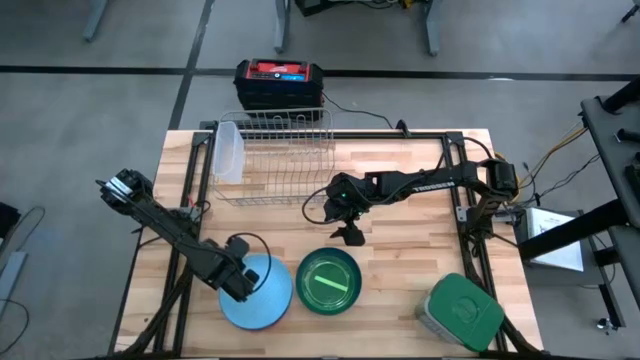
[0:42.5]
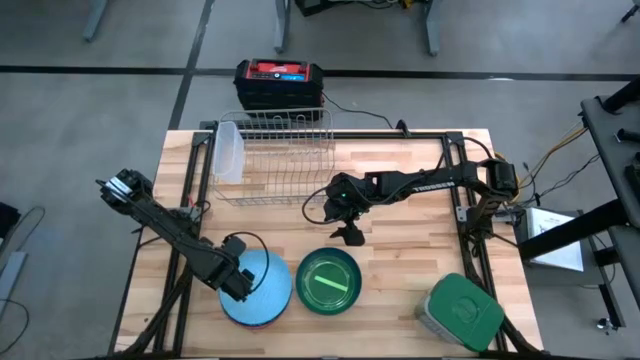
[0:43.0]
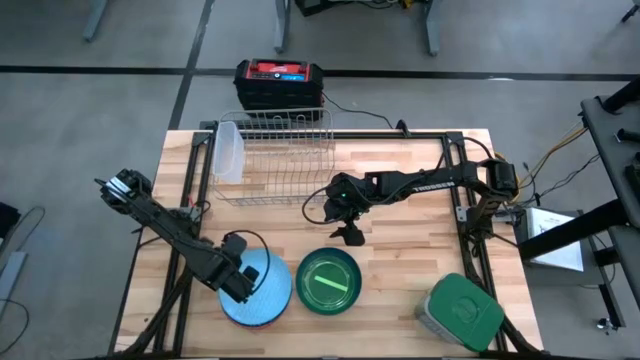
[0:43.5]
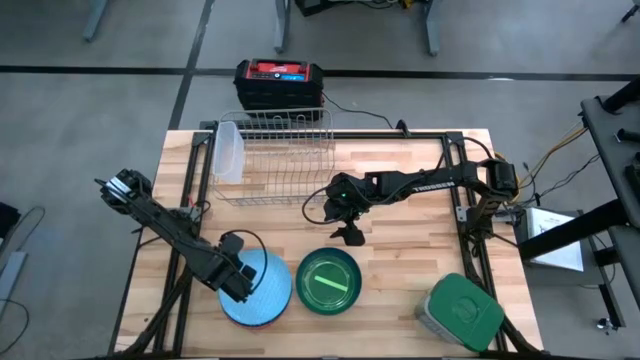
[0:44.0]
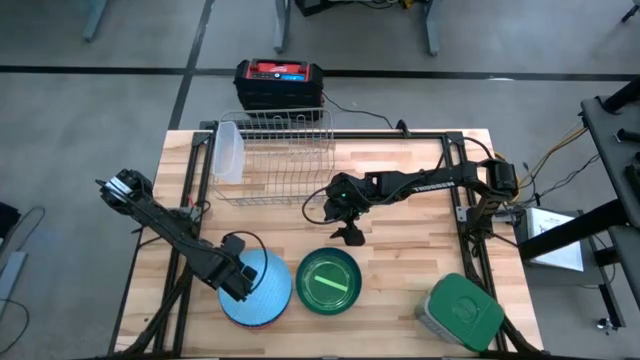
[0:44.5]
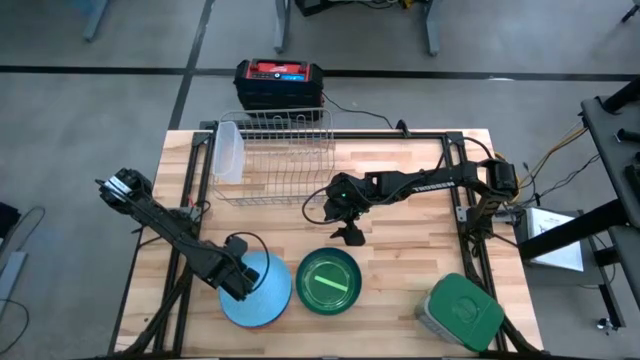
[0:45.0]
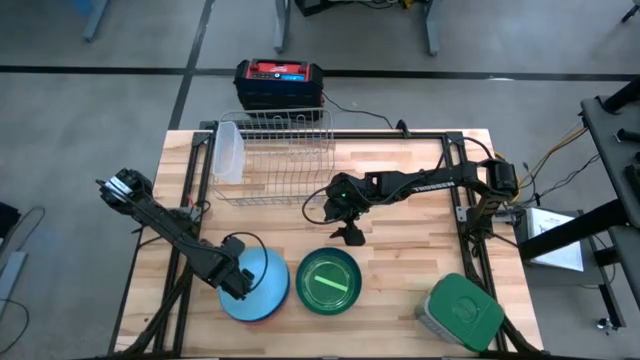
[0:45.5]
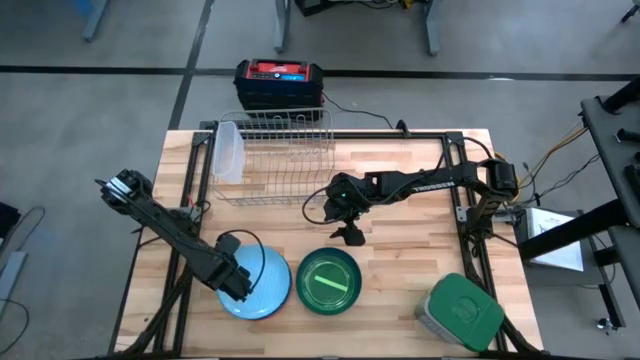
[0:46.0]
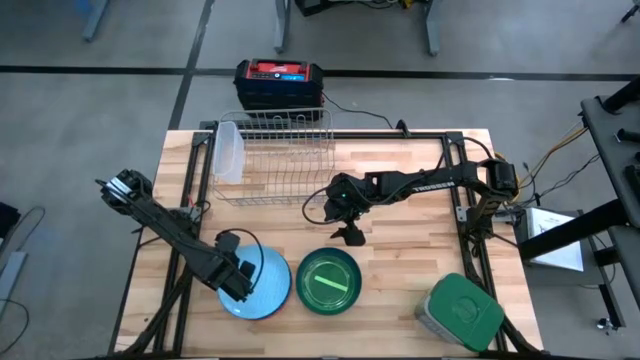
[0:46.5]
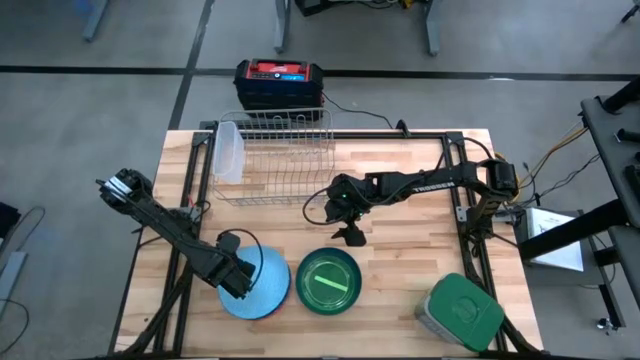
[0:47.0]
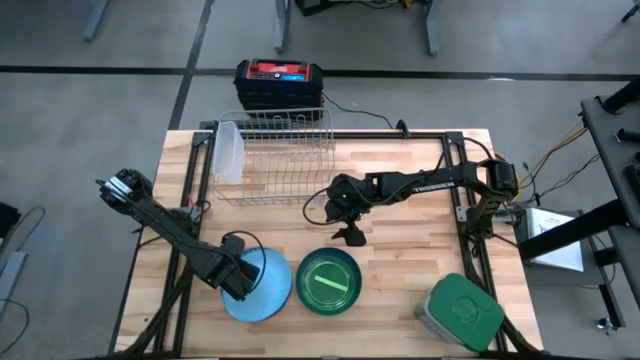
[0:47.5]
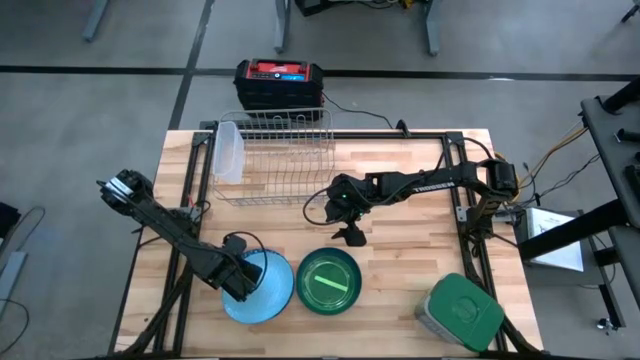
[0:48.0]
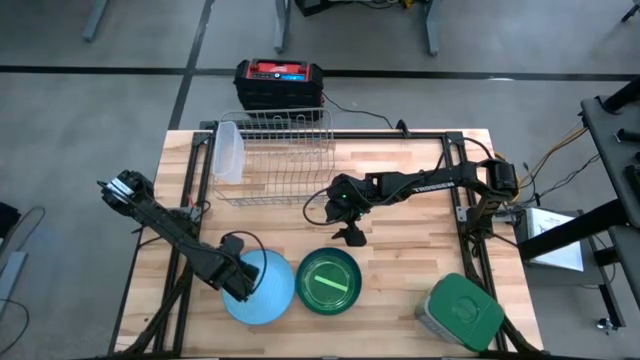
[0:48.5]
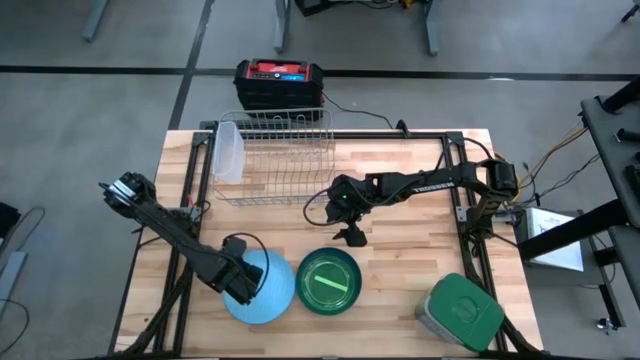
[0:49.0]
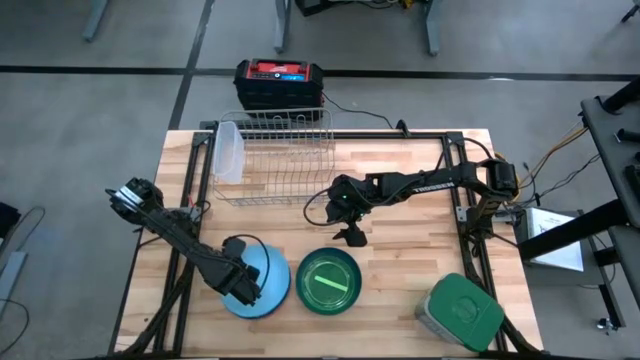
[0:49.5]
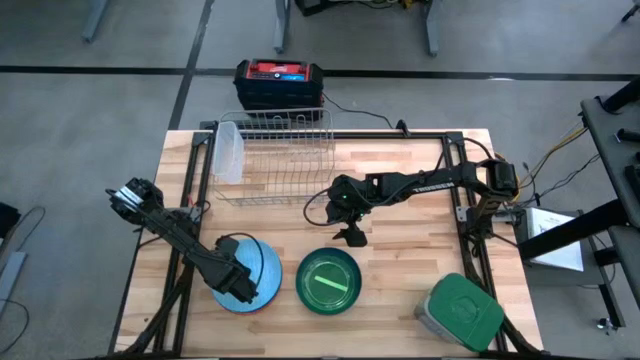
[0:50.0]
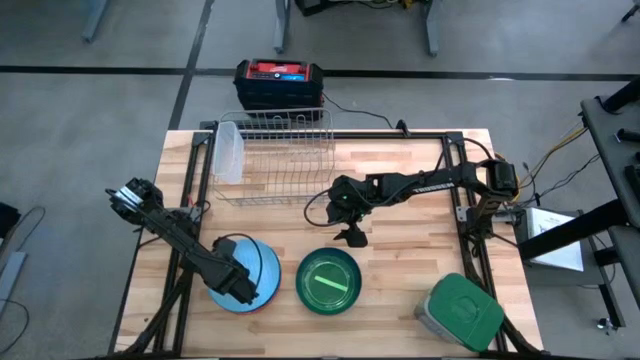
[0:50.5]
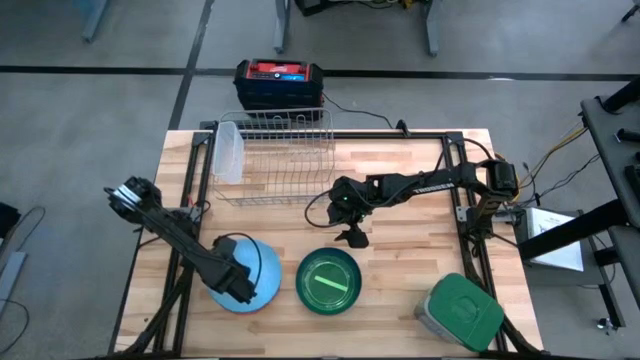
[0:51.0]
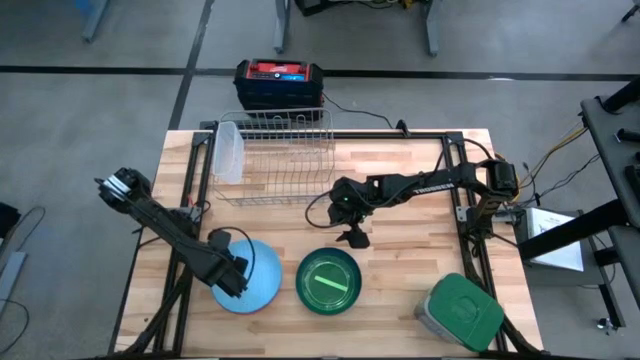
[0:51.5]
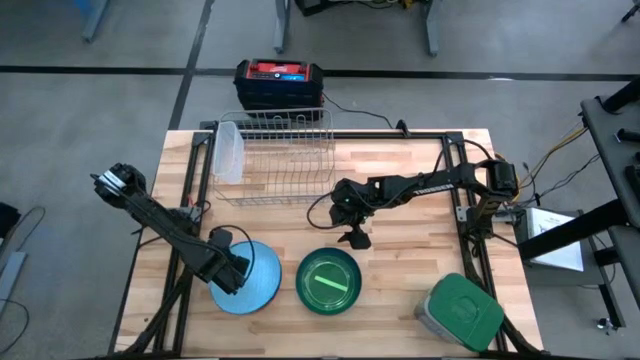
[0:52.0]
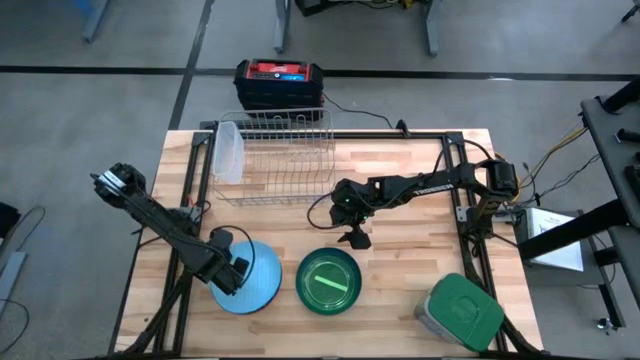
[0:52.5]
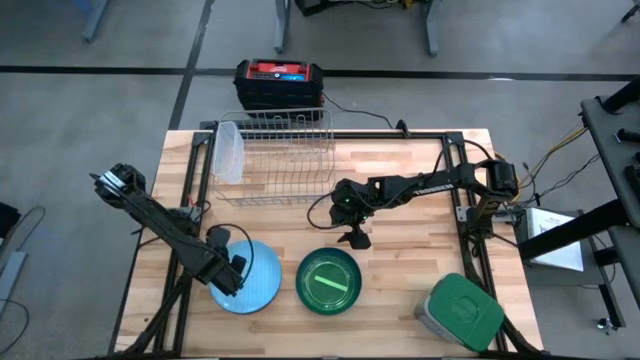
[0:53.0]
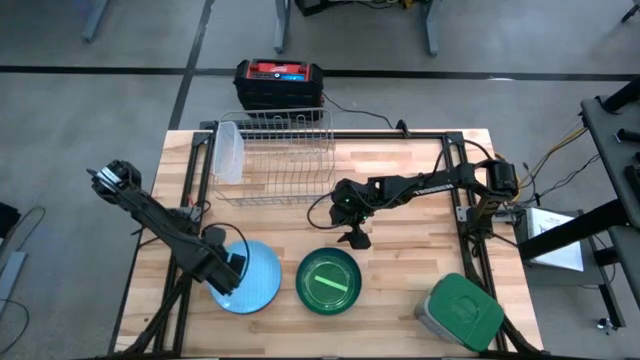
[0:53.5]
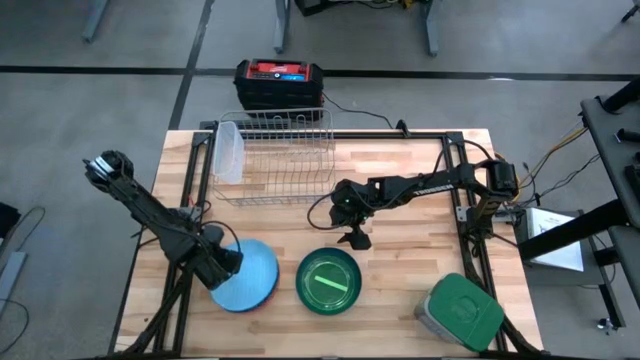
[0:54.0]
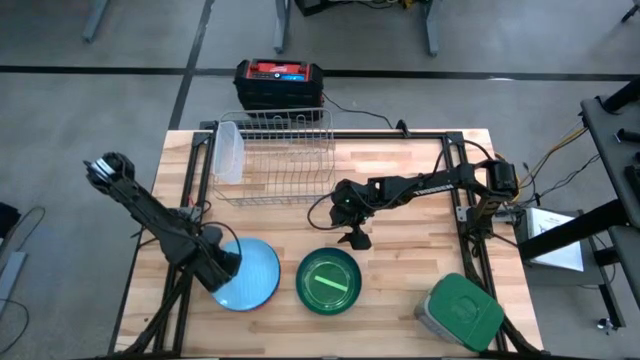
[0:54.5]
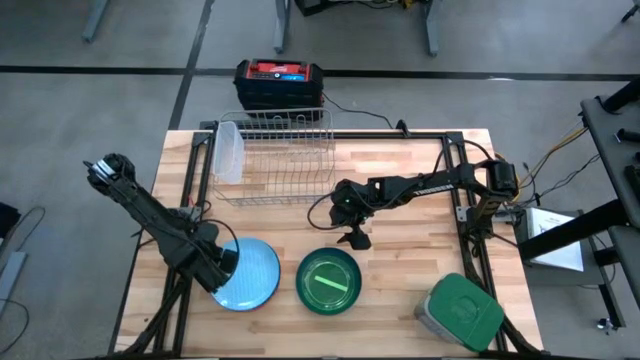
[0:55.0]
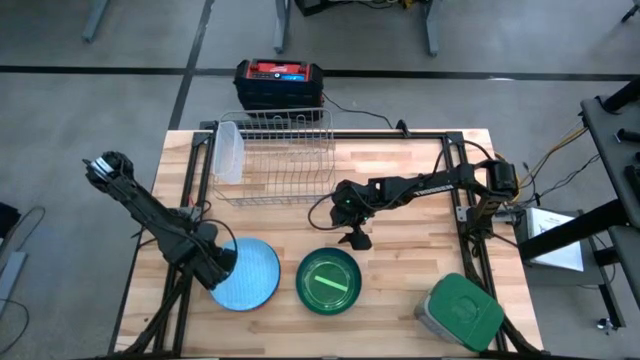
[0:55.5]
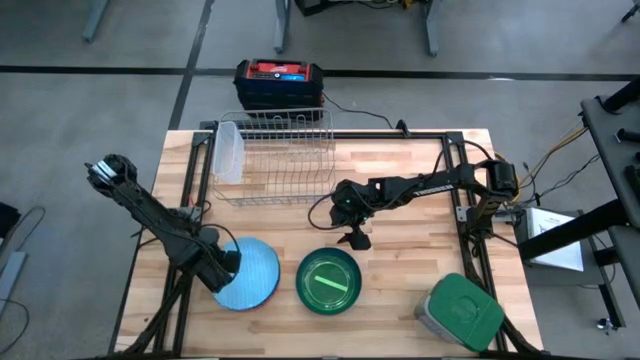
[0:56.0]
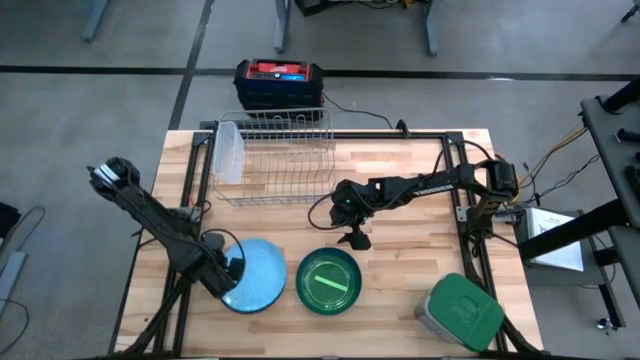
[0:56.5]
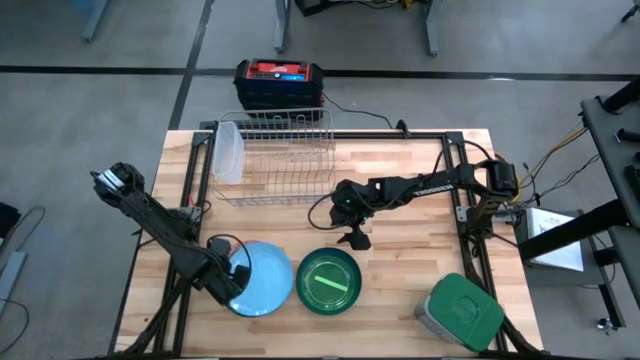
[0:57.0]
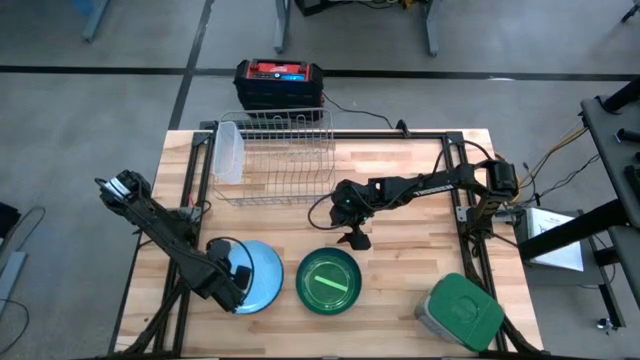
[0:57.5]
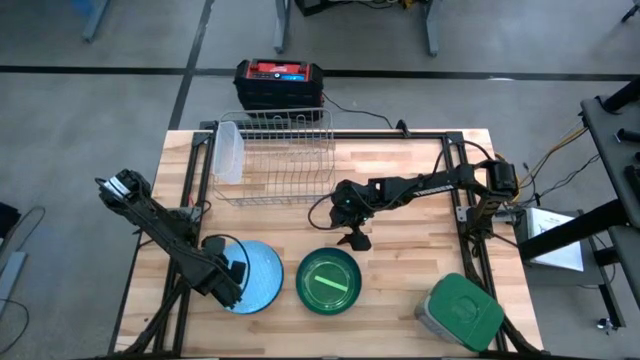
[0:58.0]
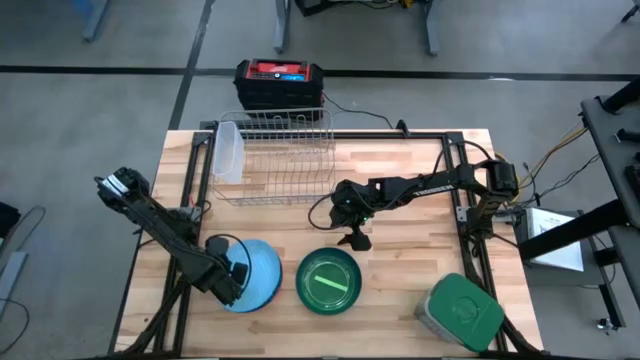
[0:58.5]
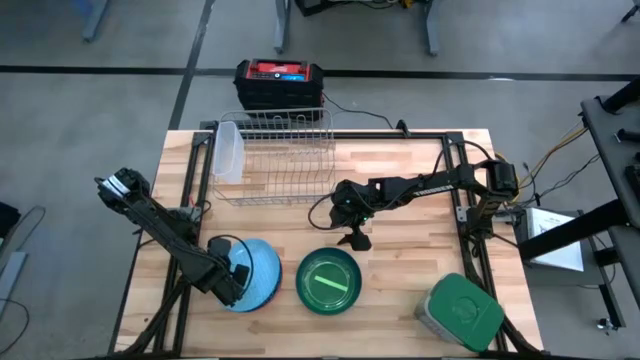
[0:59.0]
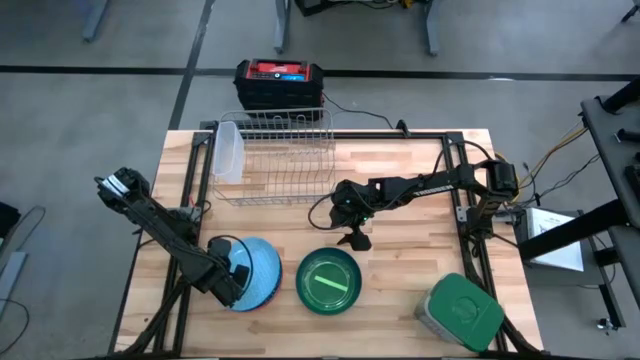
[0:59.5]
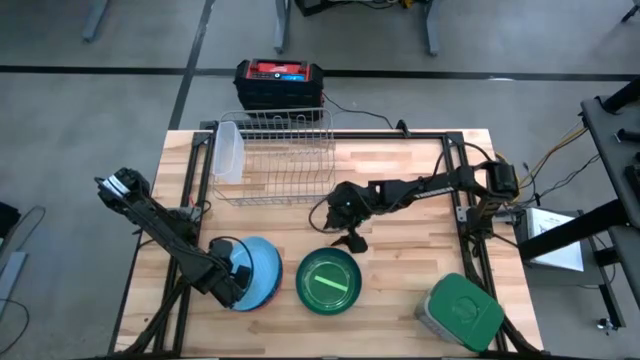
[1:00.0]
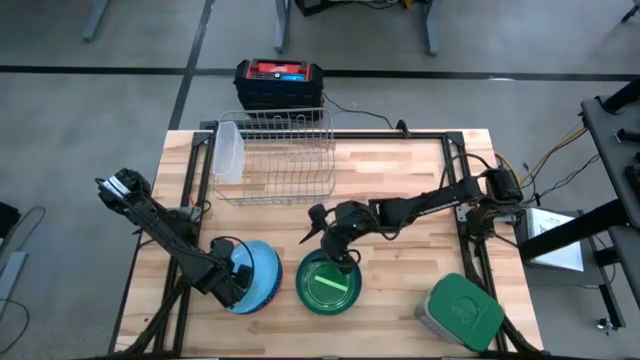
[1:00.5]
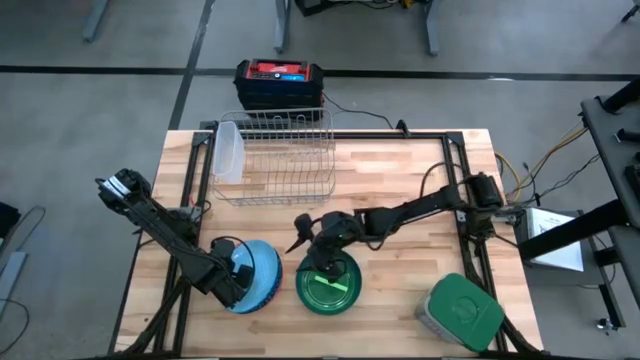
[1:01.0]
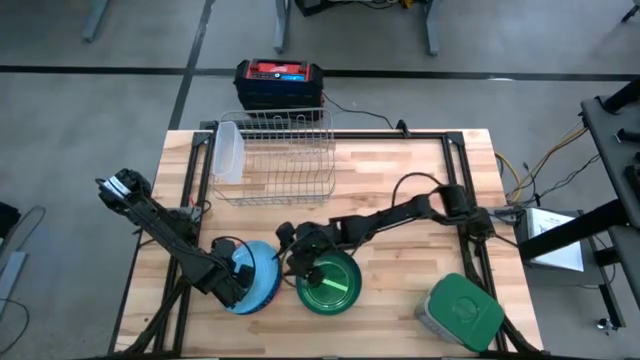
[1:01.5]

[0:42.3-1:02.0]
Task: Sort dishes
Put the light blue patterned plate into the dish rack

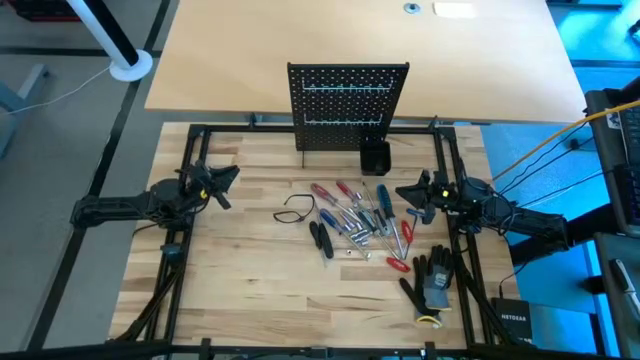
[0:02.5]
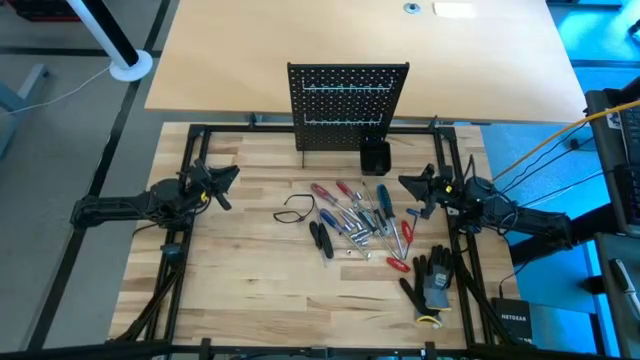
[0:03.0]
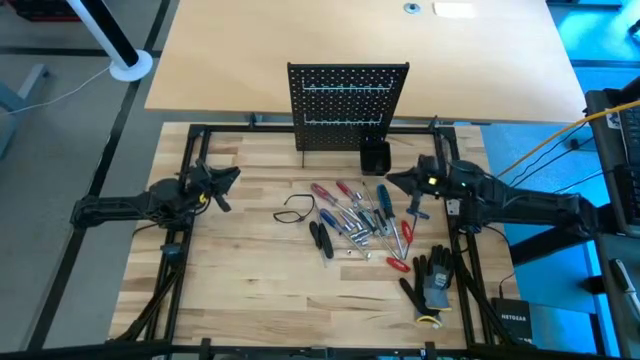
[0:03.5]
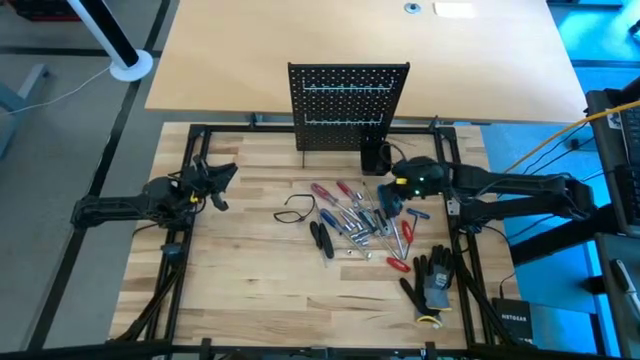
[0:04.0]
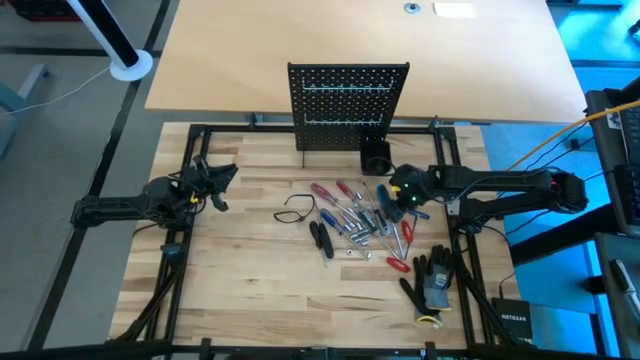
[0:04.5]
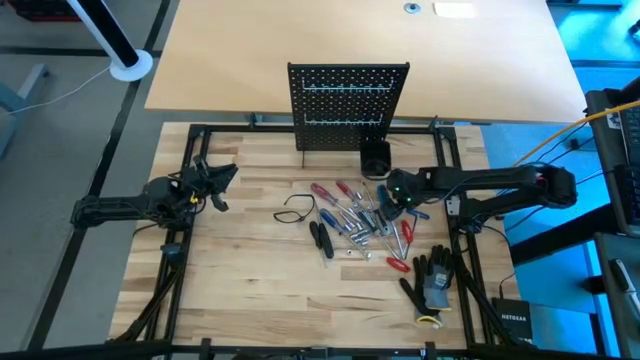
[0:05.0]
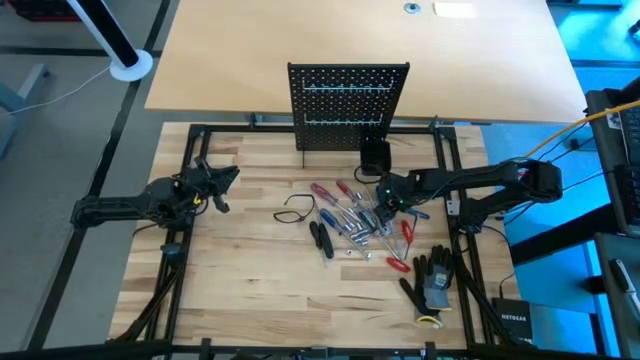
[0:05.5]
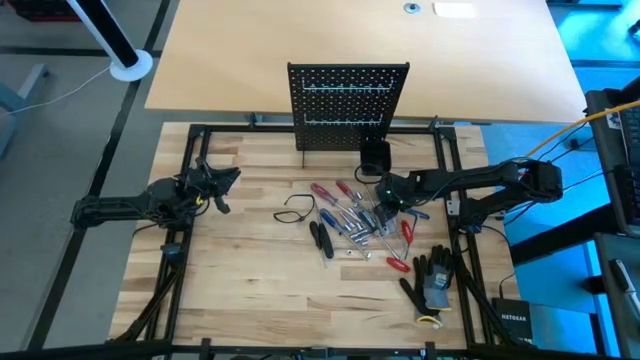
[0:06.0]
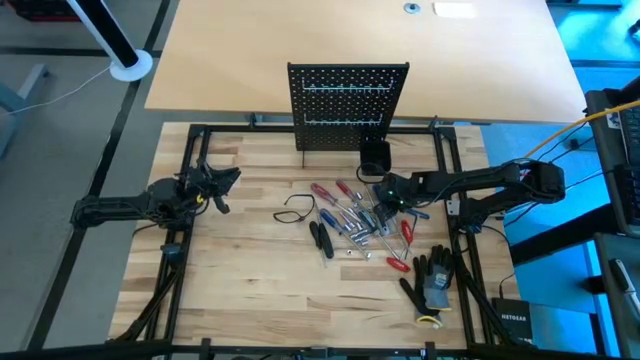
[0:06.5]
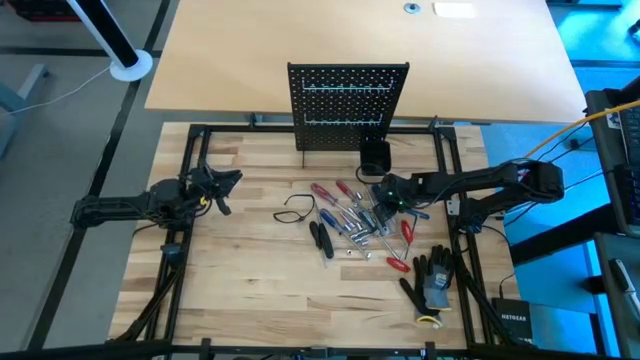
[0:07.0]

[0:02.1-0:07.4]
Task: Hang tools onto peg board
Hang the blue screwdriver on the peg board
